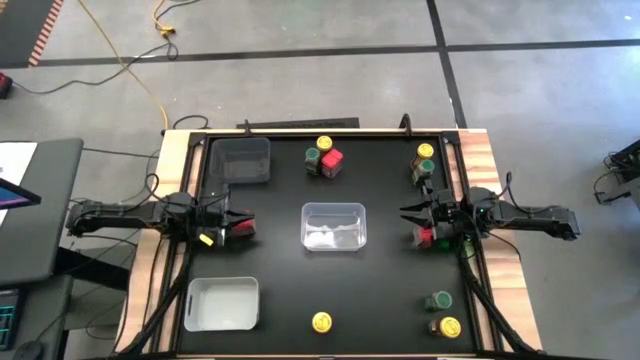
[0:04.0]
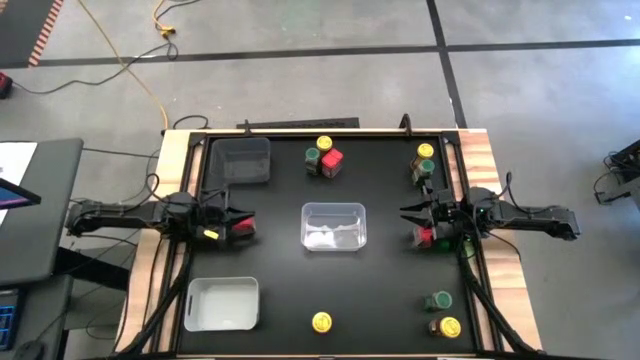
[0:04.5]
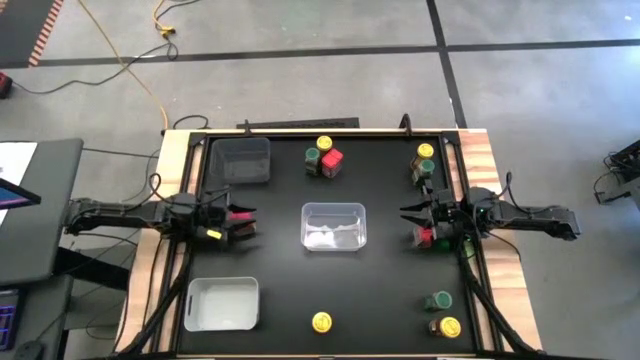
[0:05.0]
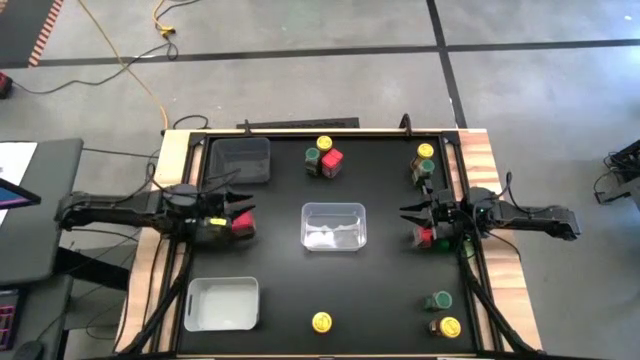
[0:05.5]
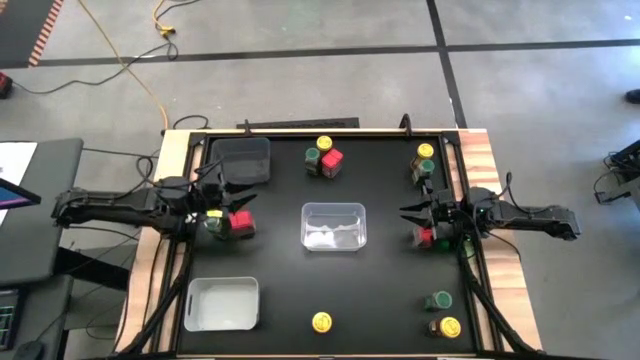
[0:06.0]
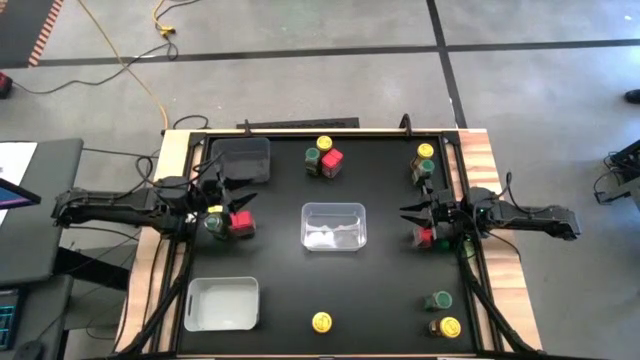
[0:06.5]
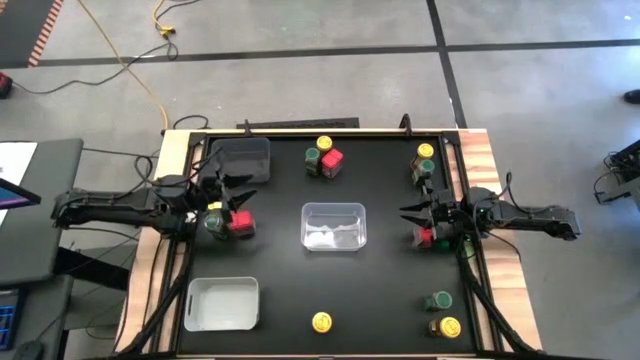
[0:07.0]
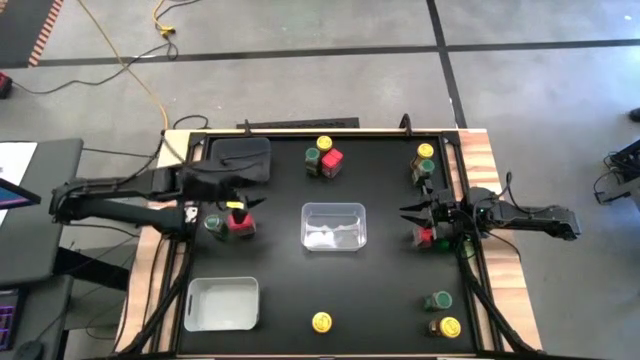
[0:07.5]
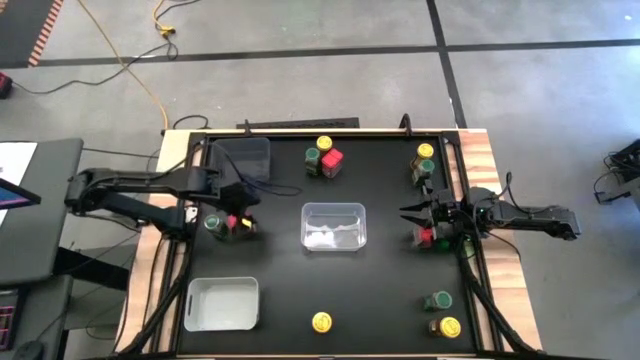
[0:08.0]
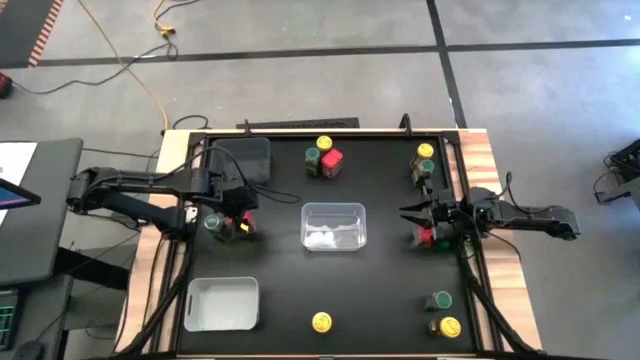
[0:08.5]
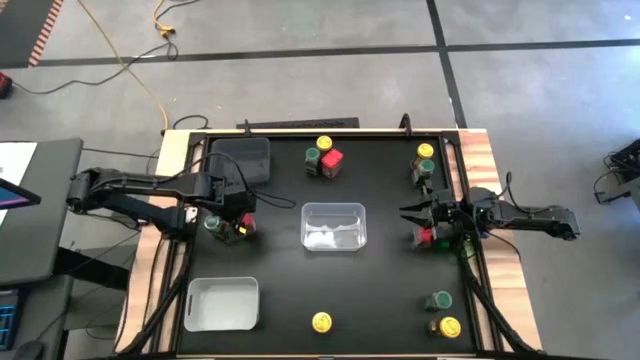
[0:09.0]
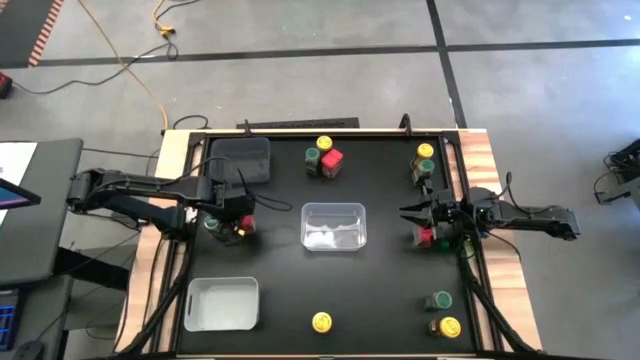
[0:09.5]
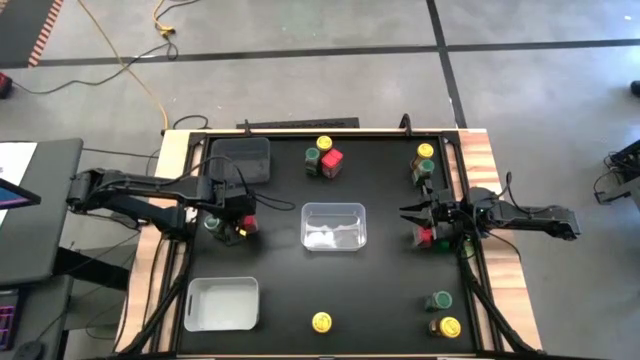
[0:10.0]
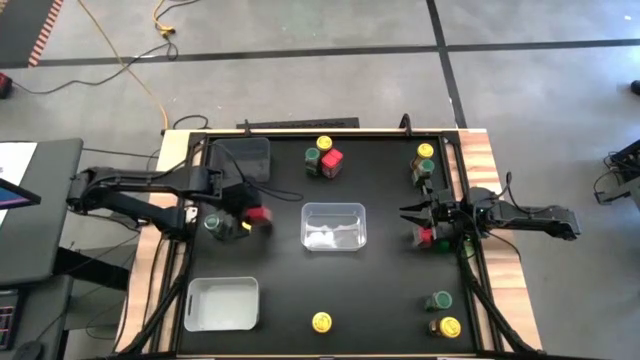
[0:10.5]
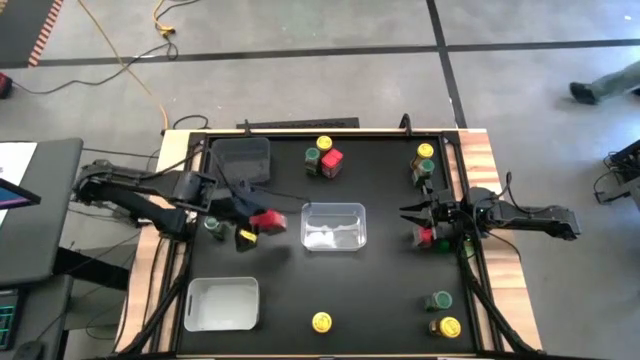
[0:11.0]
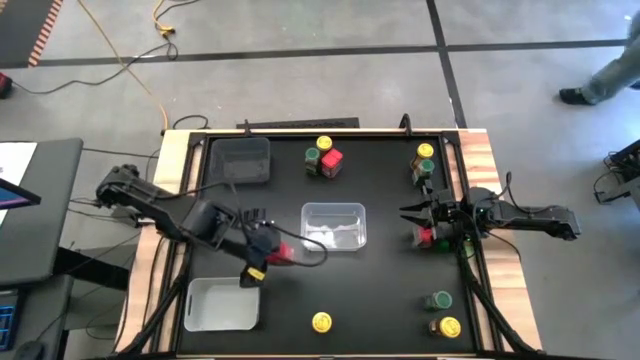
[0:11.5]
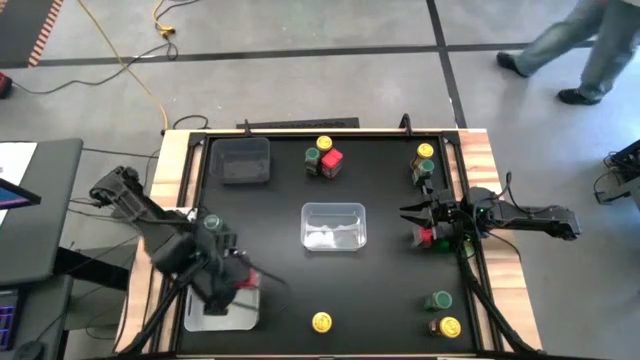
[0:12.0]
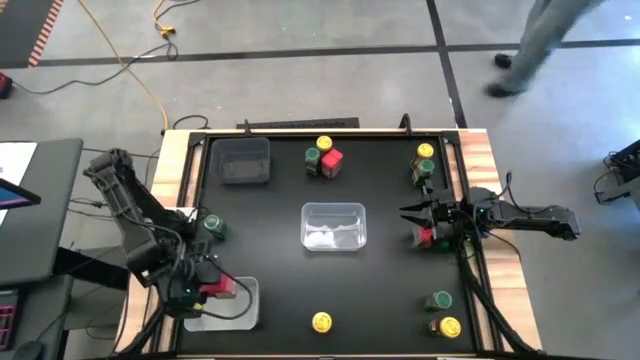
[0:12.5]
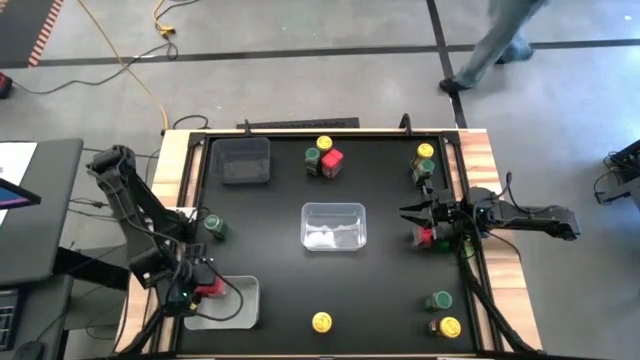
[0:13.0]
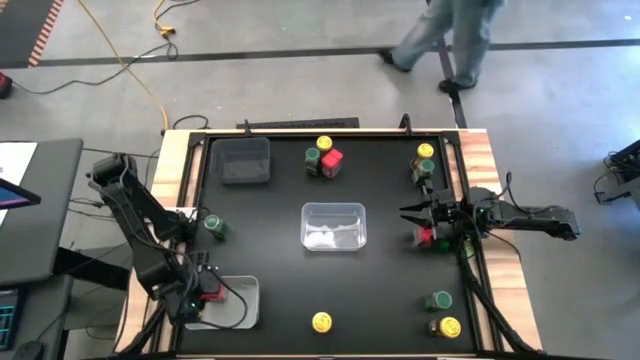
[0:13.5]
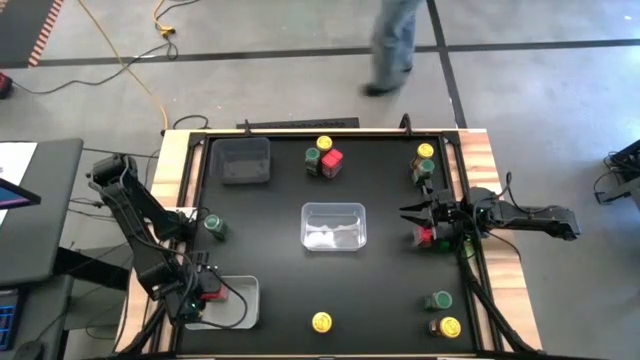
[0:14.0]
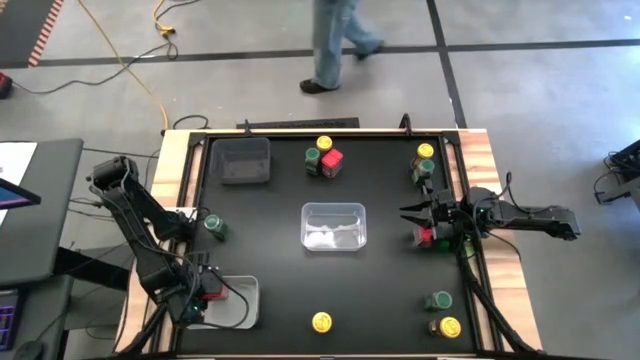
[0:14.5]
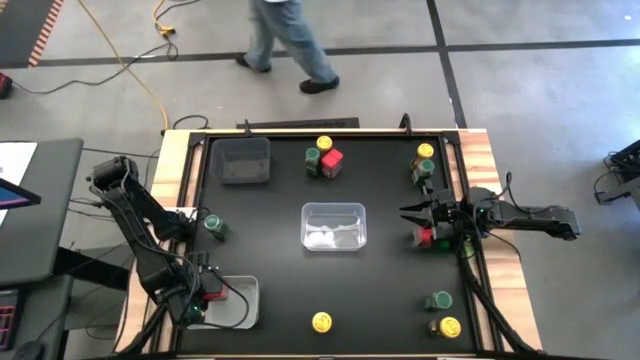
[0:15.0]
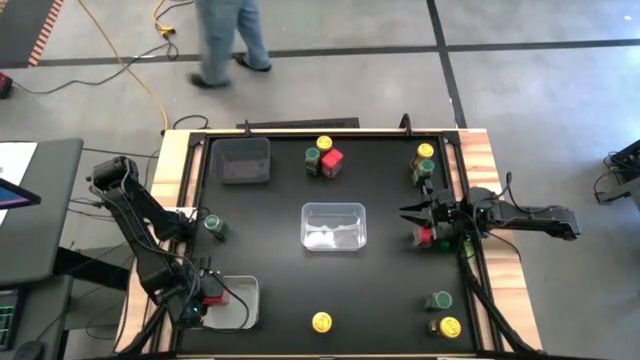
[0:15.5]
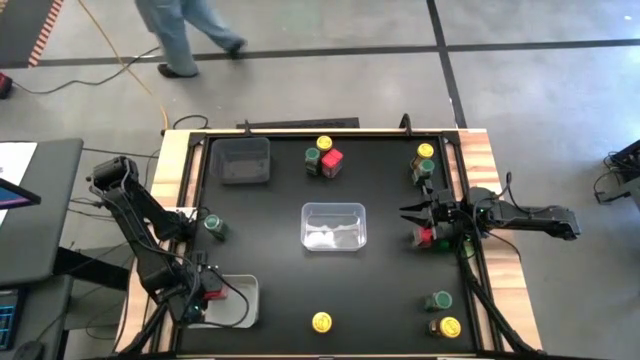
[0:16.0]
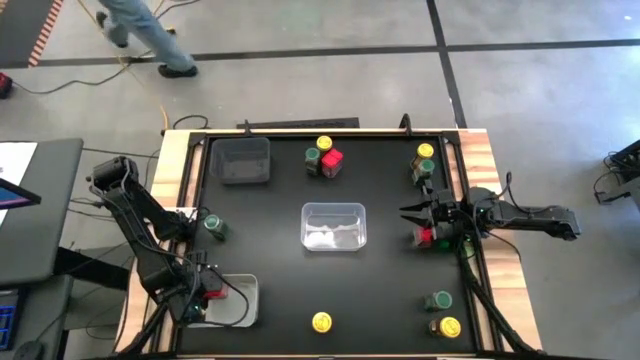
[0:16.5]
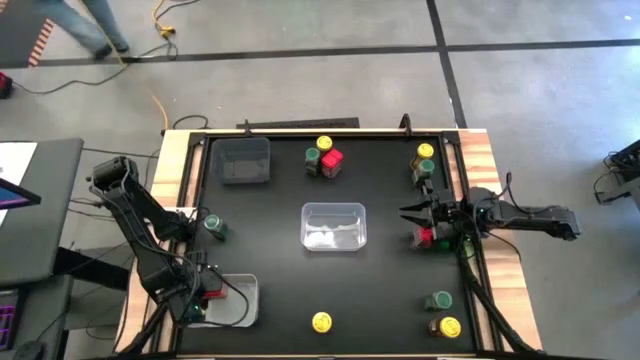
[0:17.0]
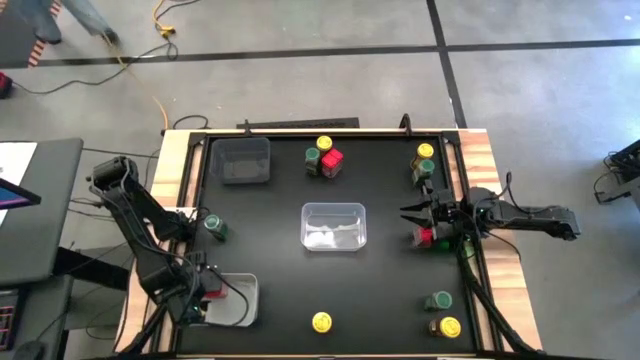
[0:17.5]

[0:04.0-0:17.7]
Task: Sort spices by type
Put the red seasoning can into the gray bin

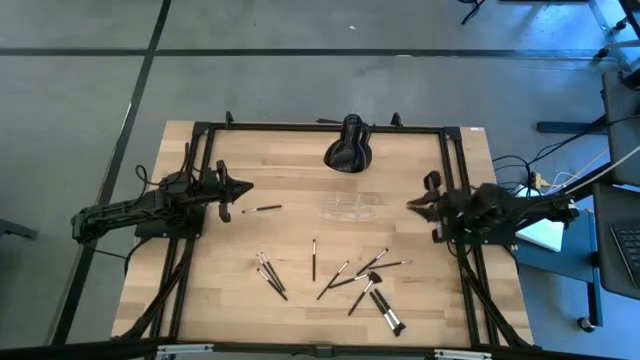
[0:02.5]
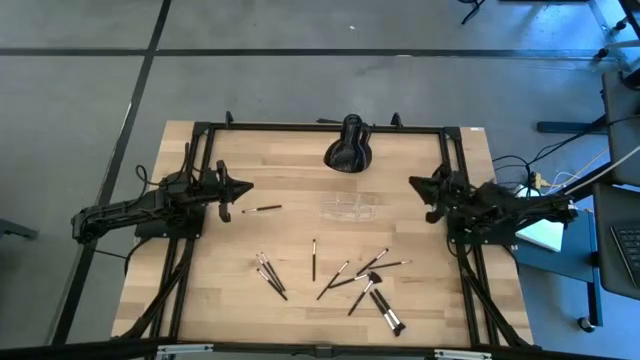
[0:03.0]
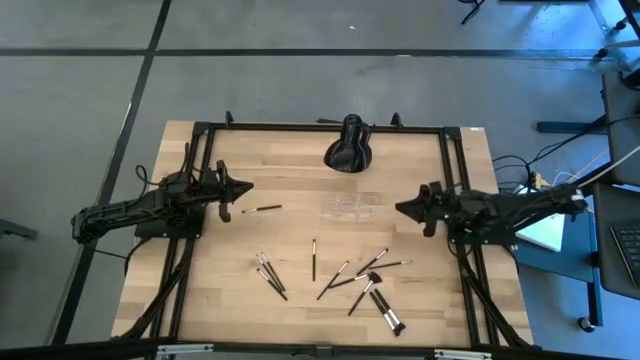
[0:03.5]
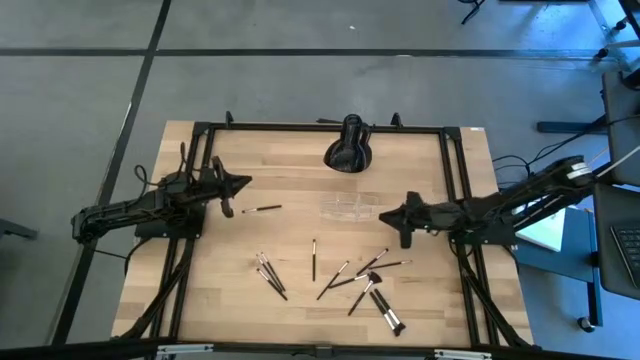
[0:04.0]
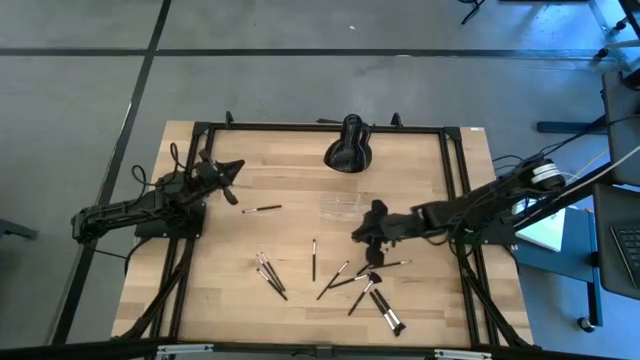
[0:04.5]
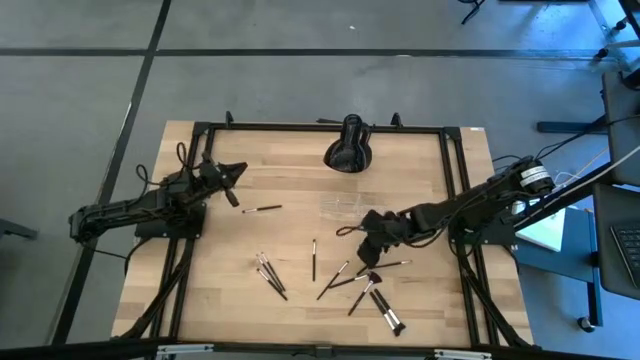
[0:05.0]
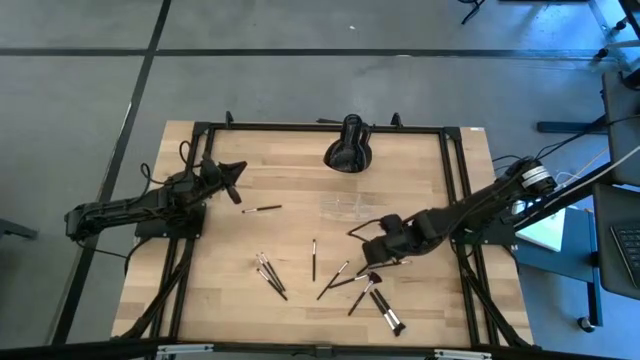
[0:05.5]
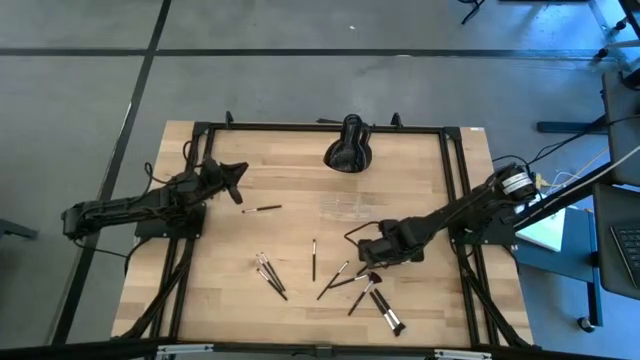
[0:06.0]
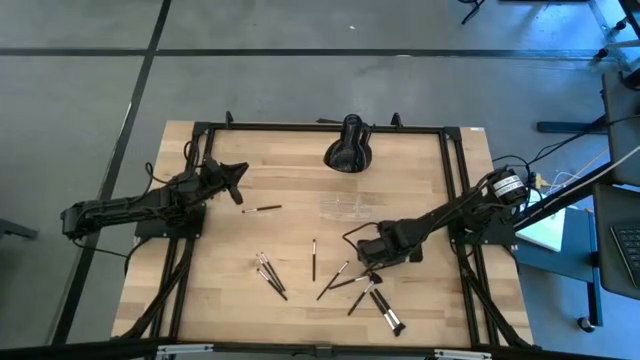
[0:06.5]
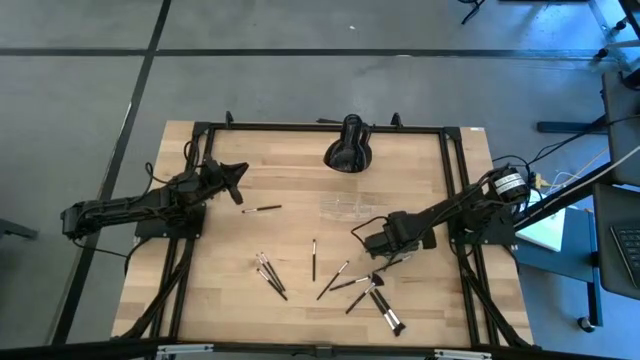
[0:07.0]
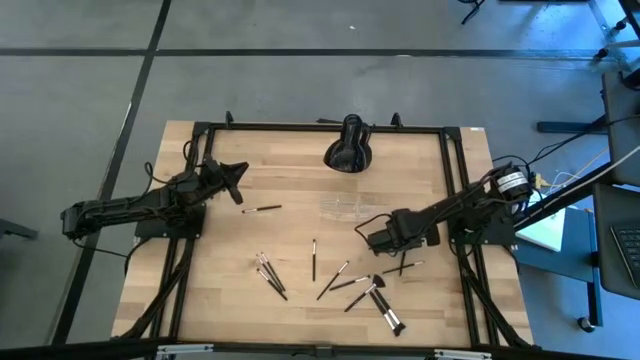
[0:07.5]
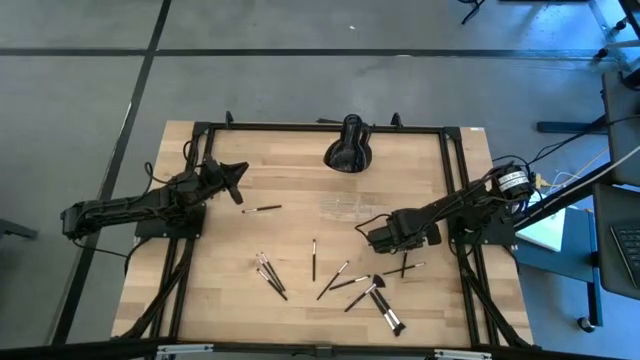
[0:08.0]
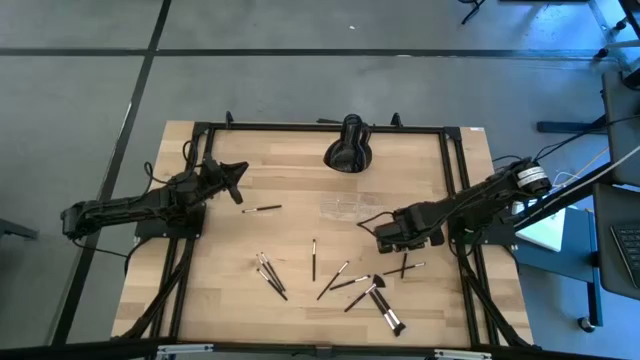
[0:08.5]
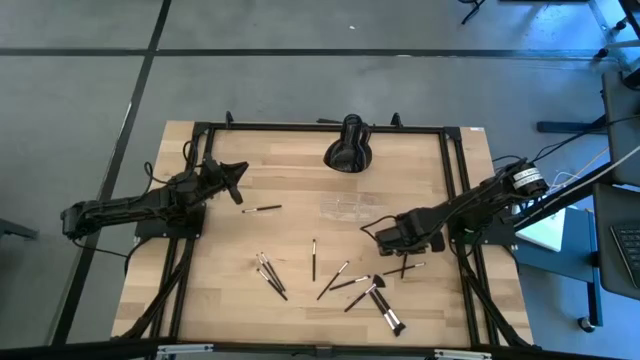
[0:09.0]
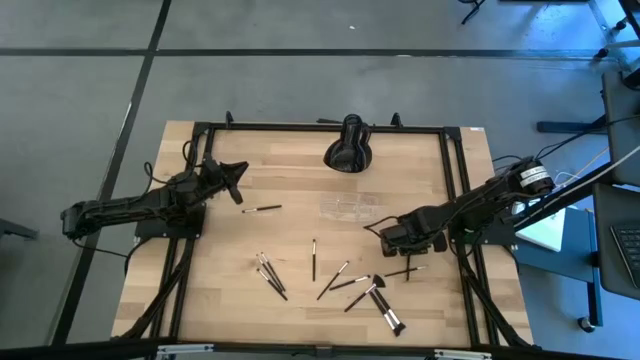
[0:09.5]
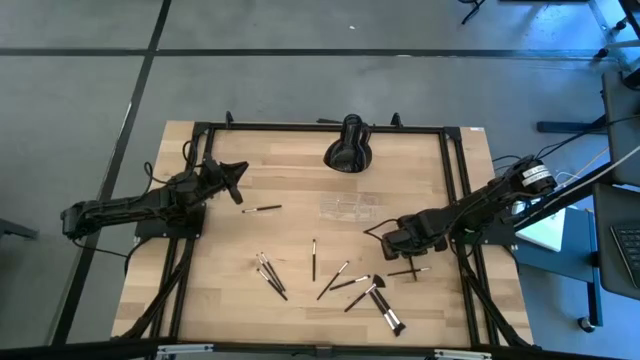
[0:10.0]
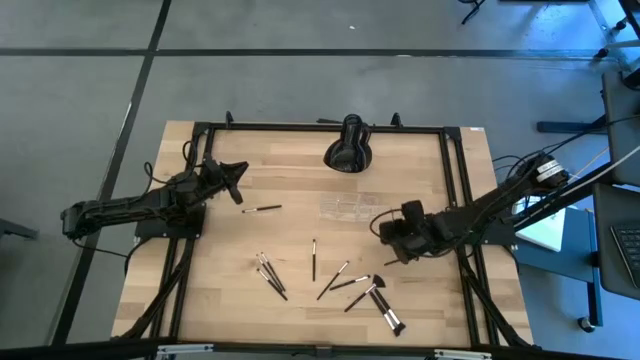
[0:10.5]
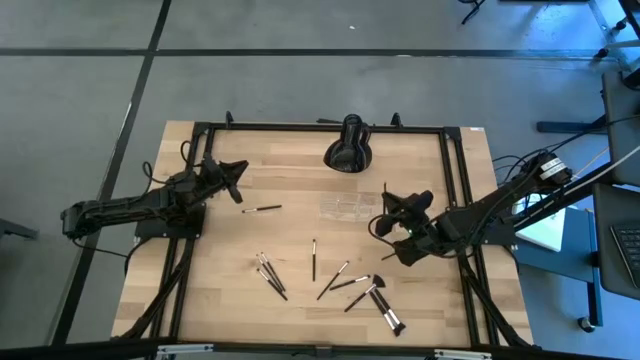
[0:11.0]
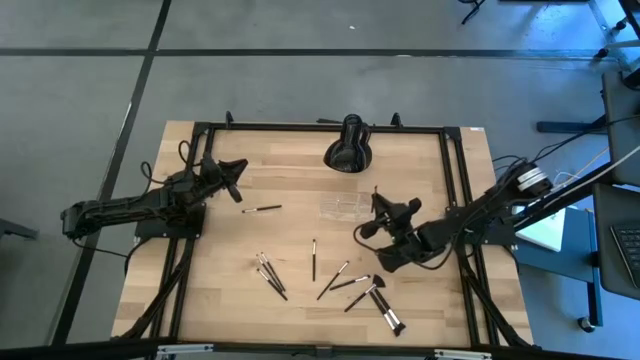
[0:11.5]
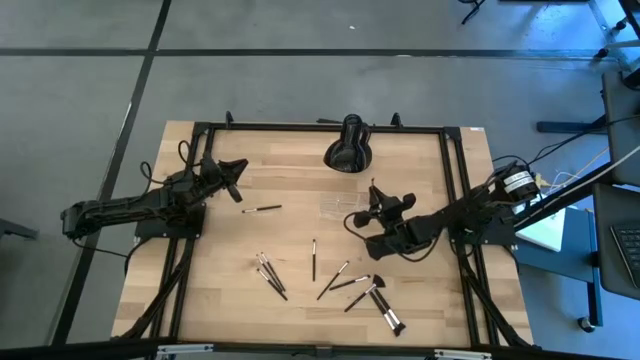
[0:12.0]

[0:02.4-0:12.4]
Task: Pick & Place Makeup Supplies
Put the makeup brush into the transparent organizer
